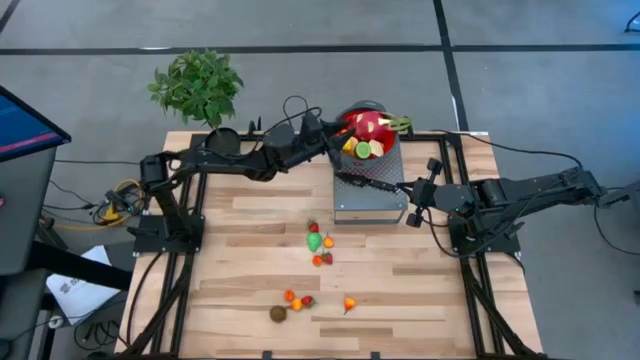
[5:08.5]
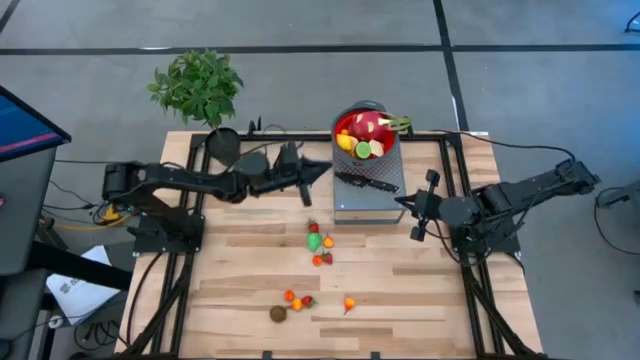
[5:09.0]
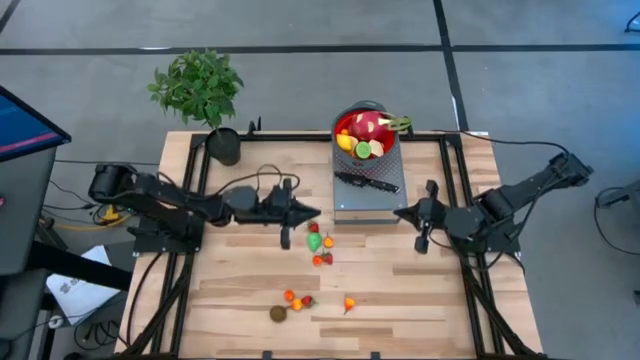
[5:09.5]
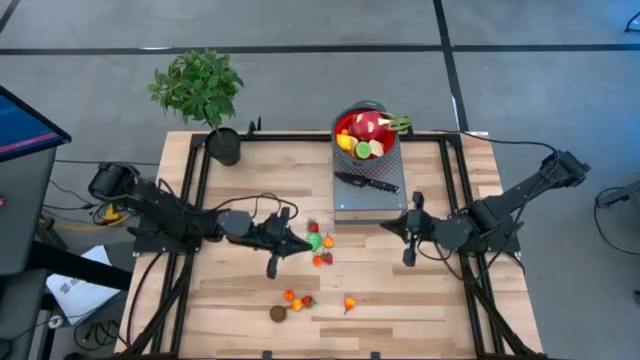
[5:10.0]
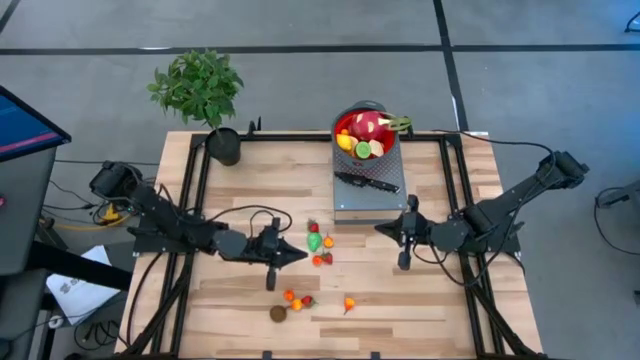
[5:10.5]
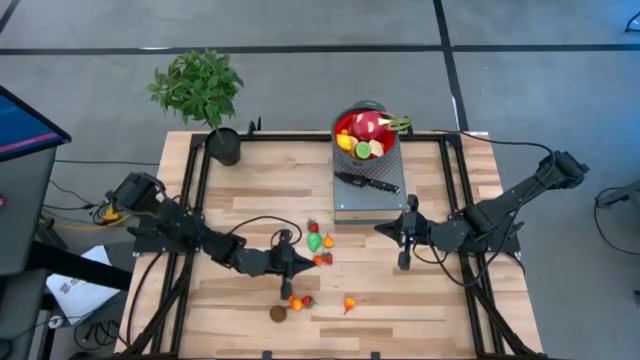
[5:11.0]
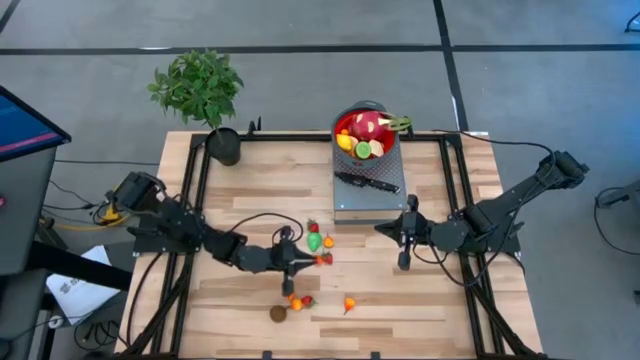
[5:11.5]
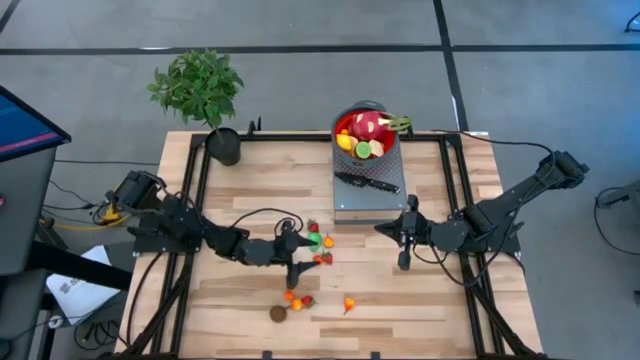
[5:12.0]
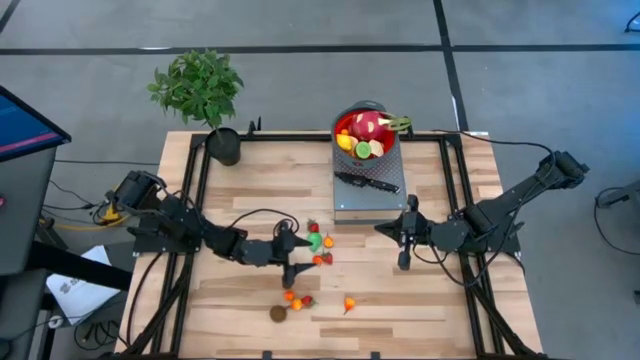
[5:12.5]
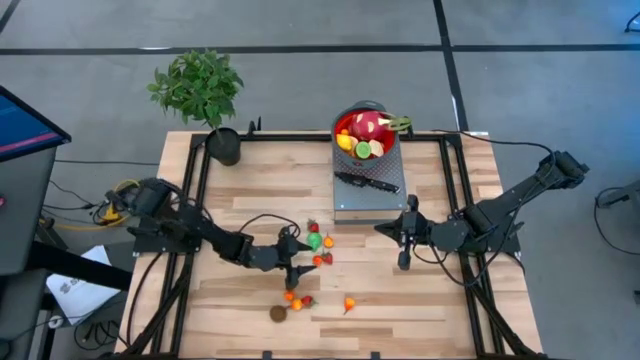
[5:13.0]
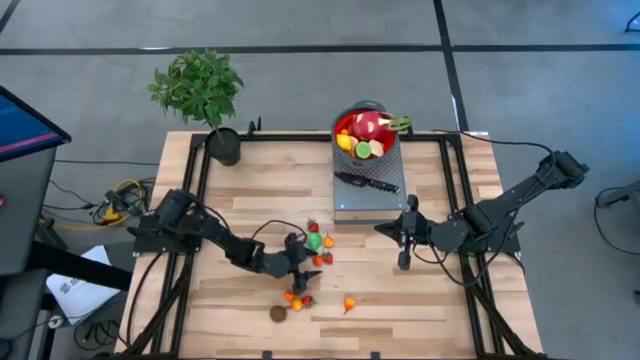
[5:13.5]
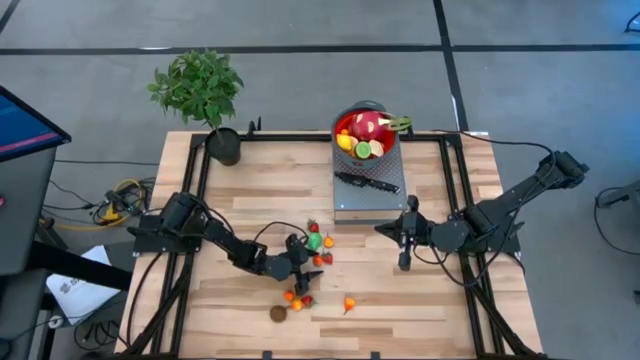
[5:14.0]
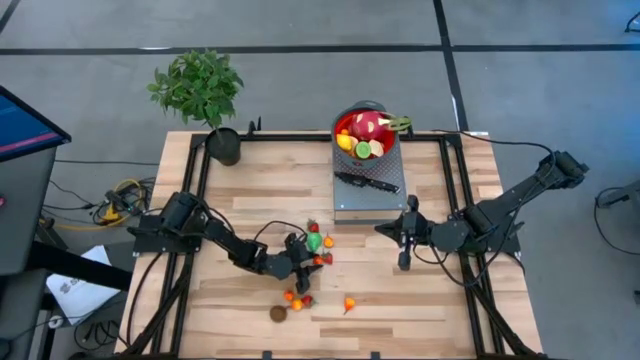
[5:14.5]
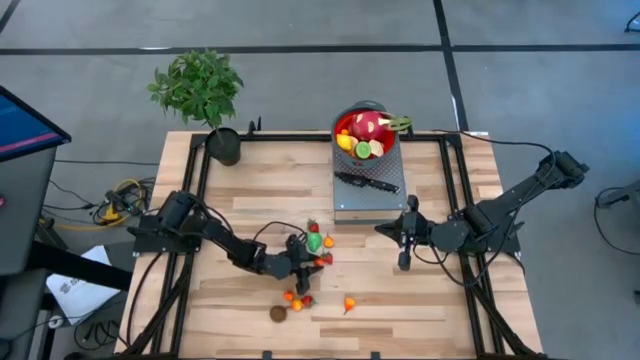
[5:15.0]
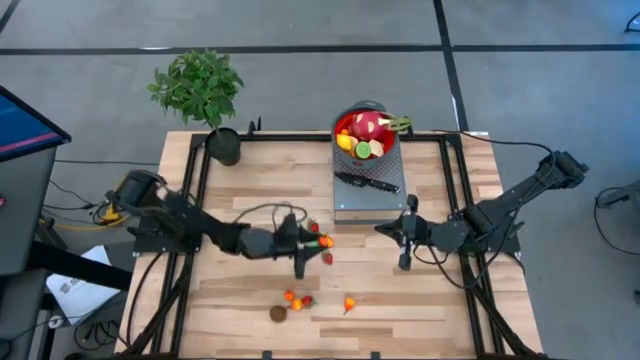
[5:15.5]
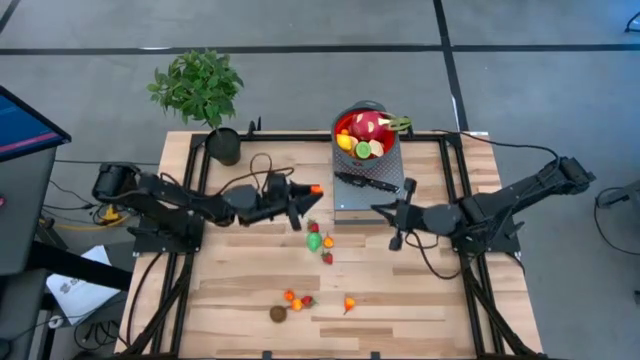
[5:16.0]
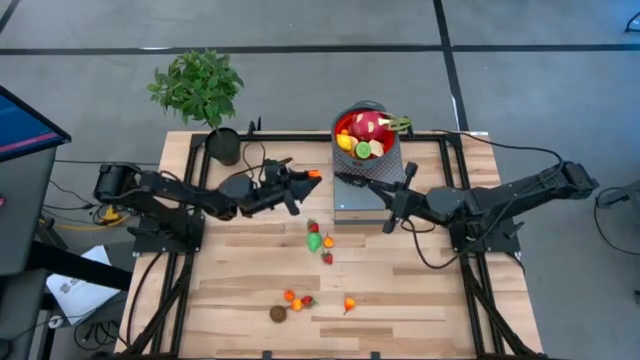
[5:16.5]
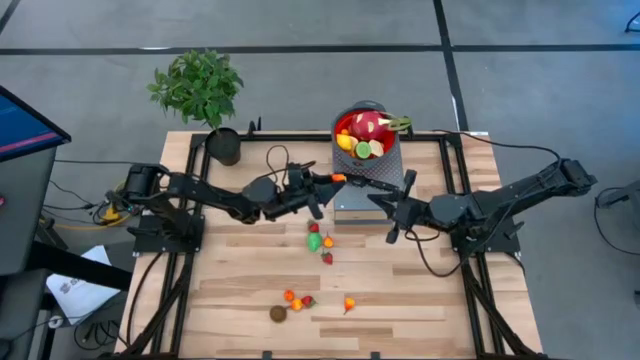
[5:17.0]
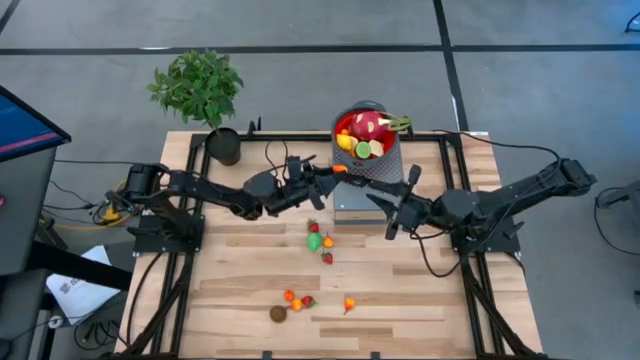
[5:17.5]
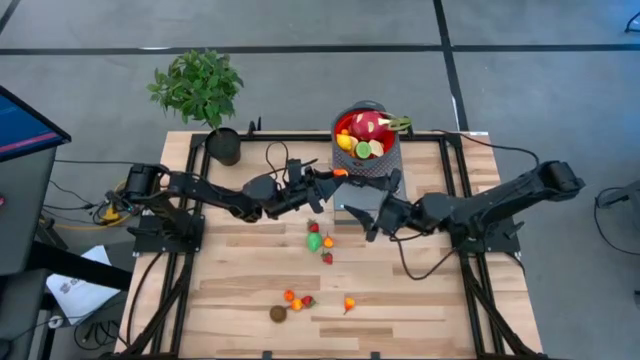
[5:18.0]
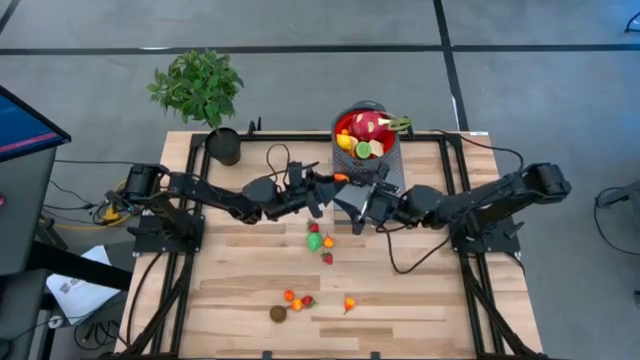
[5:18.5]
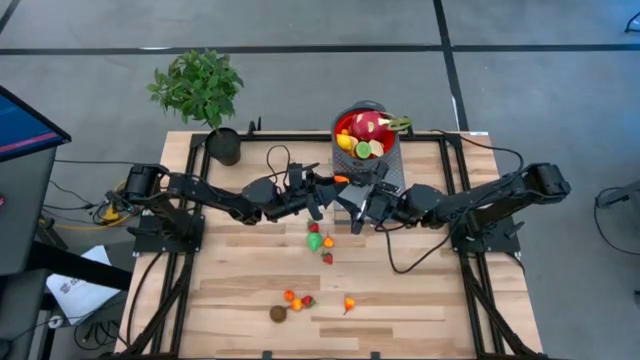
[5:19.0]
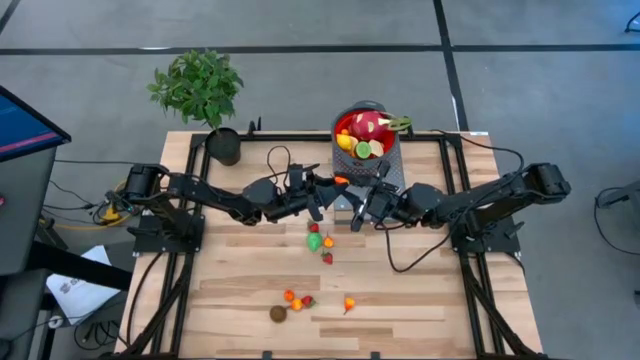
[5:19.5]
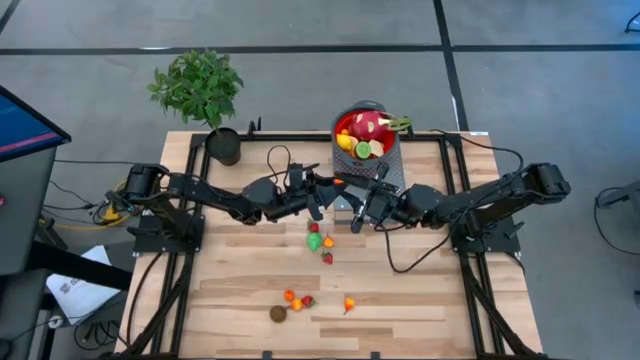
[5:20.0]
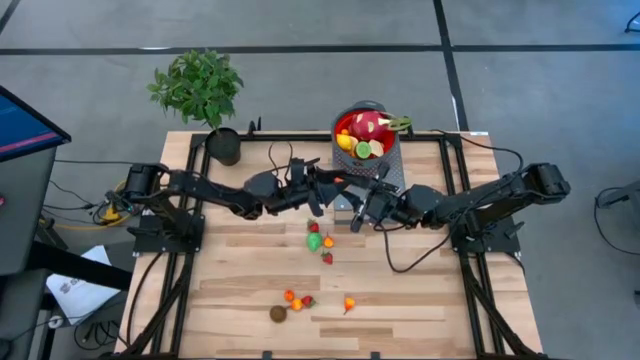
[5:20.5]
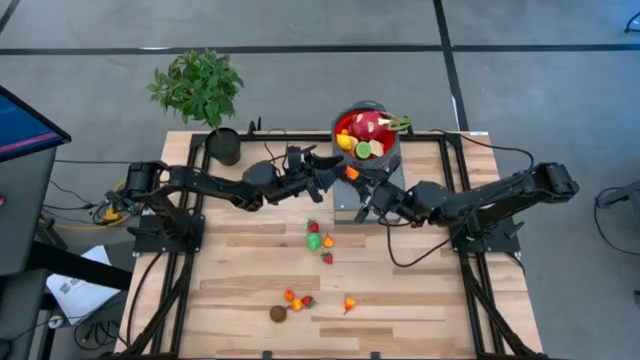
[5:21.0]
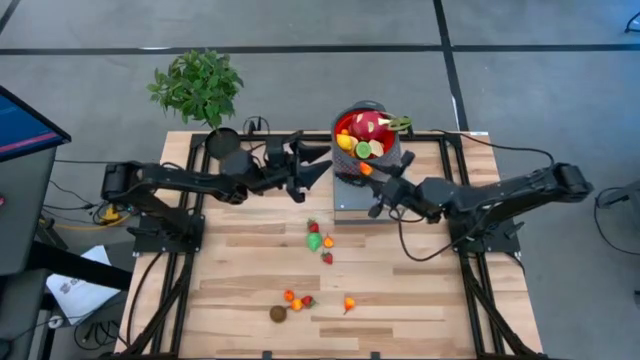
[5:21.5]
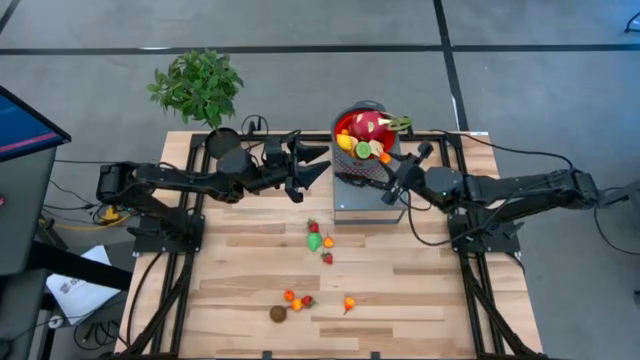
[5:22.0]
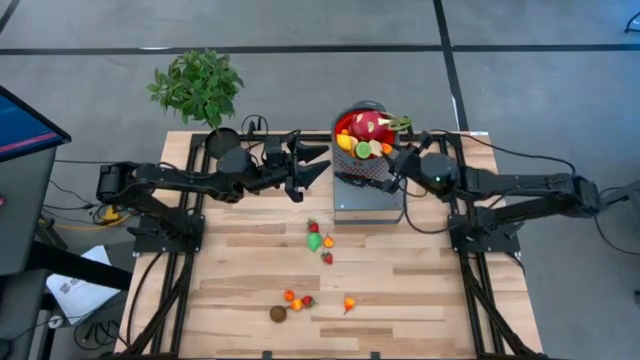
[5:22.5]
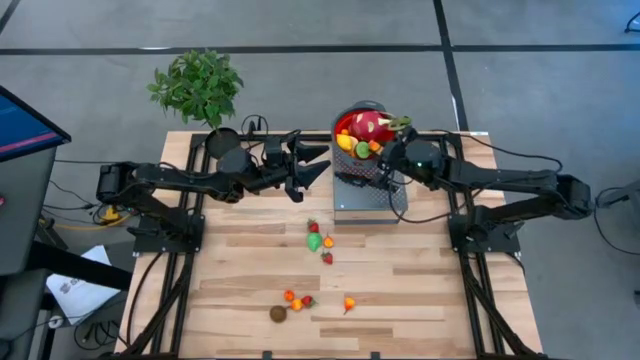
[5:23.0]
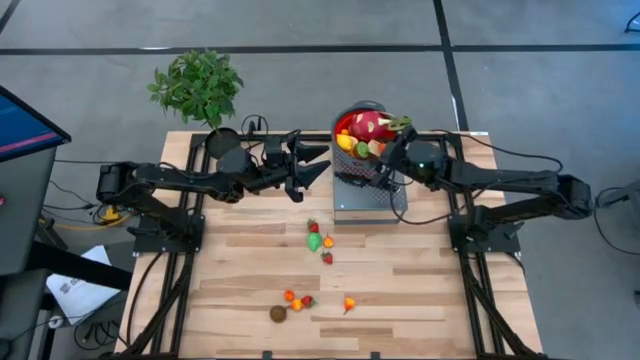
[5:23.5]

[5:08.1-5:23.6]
Task: Pick & Place Fruit
Put the yellow pear into the red colander on the shelf

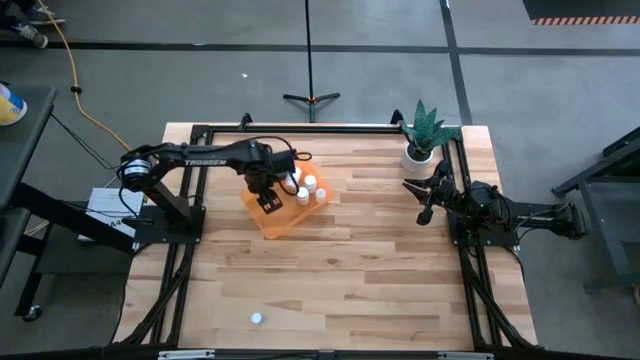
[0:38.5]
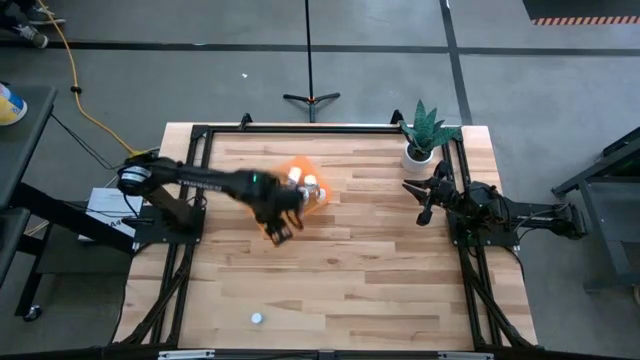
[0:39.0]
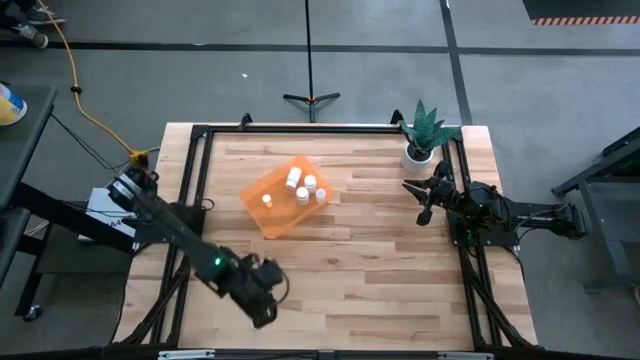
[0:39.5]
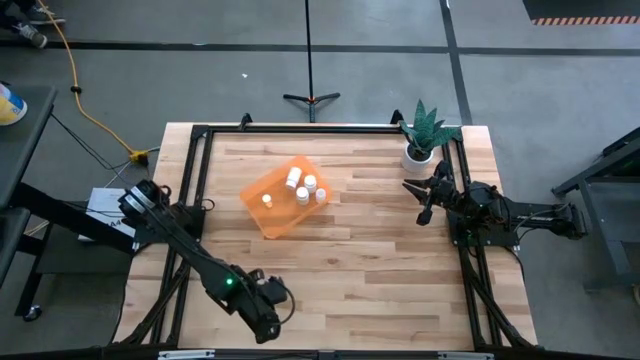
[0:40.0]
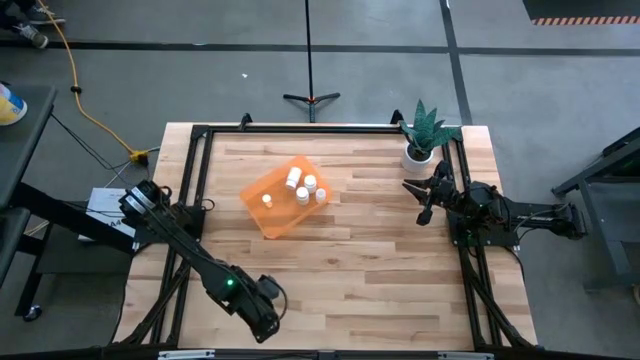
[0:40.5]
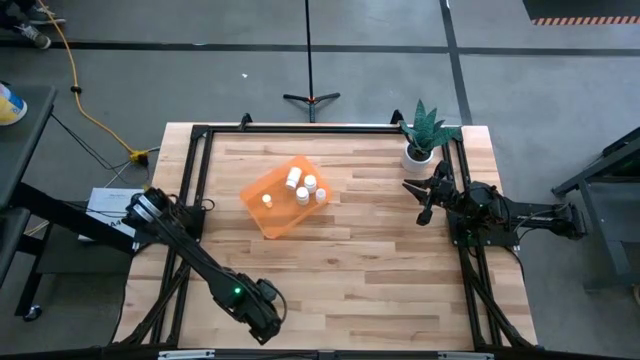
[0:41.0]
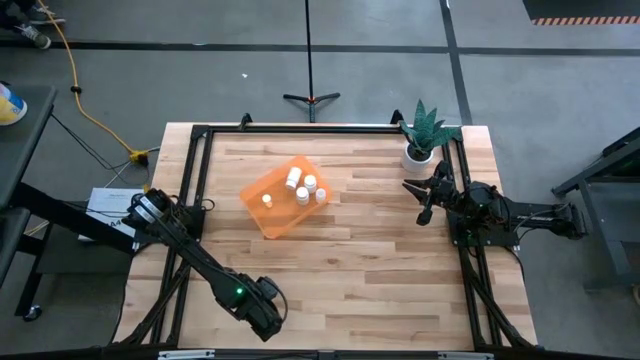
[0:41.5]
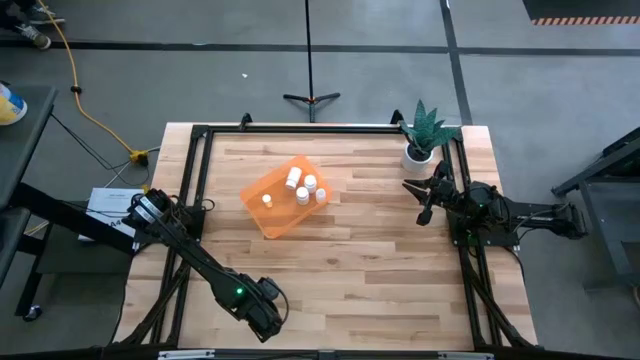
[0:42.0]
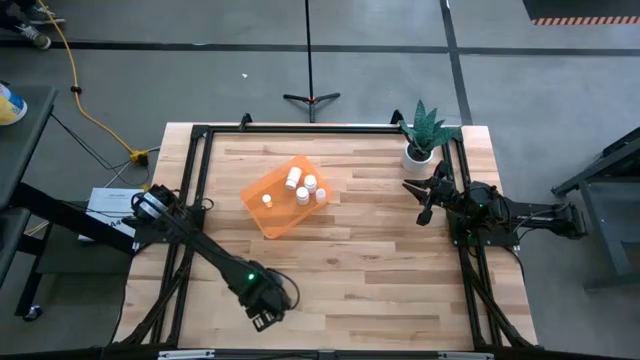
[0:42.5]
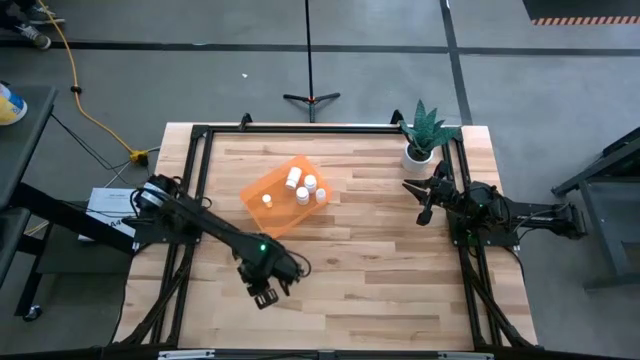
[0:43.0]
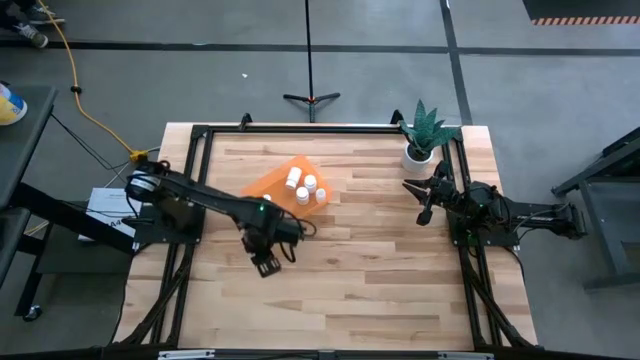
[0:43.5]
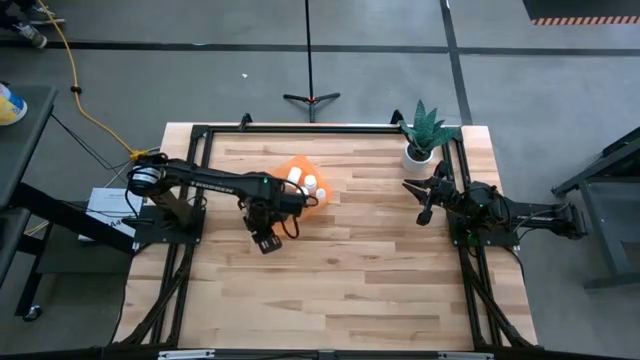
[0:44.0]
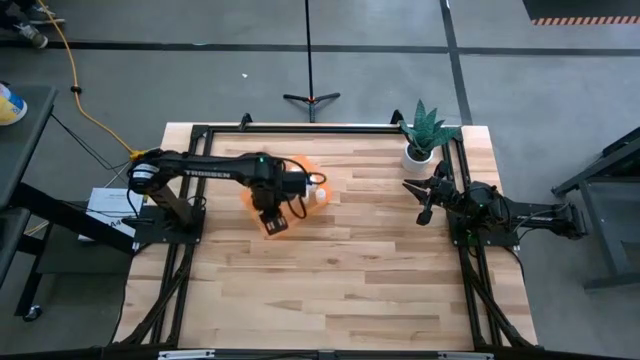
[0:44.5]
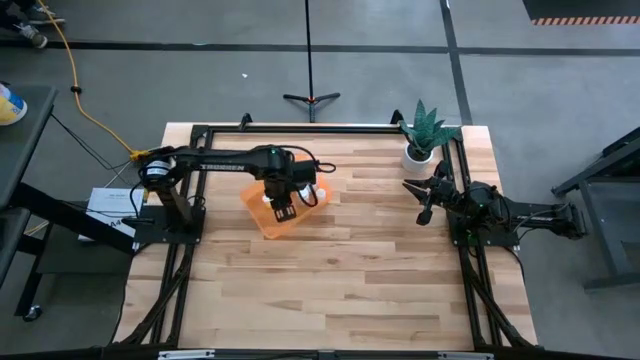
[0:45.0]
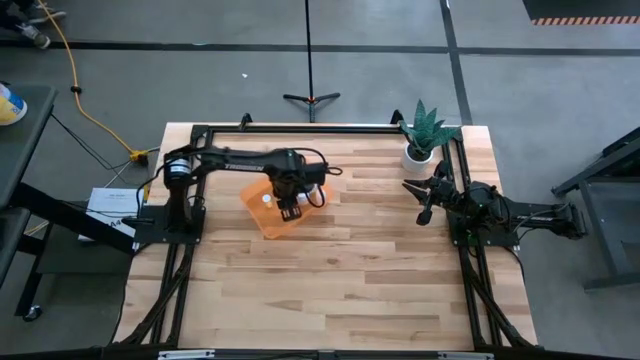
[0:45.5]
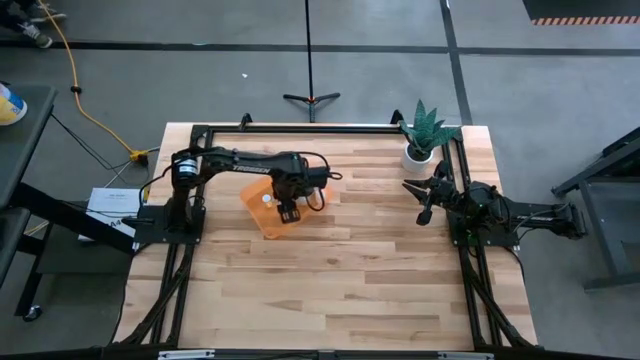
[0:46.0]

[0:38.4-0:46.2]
Task: Pick and place pill bottles into a basket
Put the blue pill bottle into the orange bin
